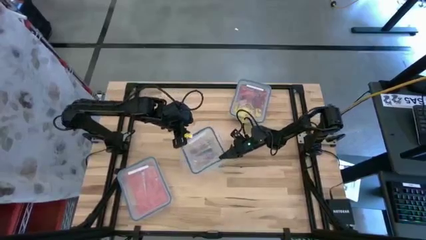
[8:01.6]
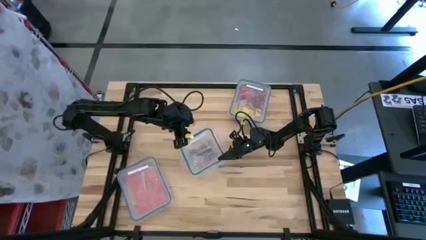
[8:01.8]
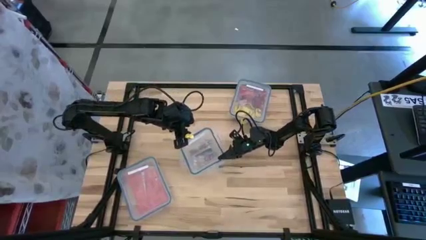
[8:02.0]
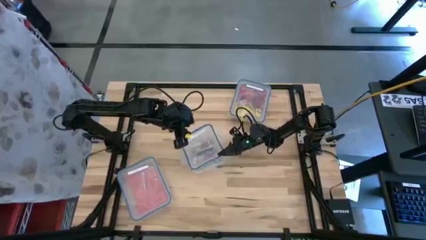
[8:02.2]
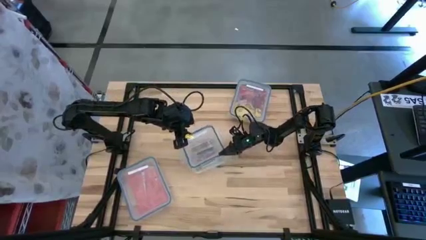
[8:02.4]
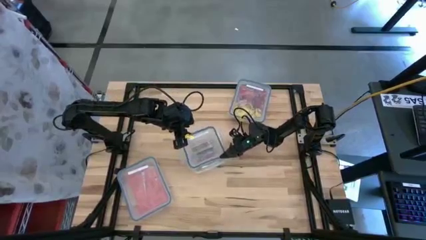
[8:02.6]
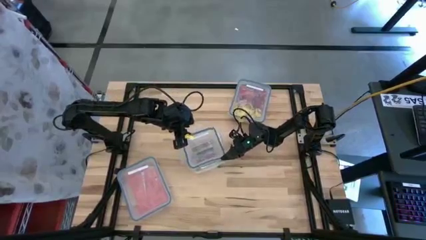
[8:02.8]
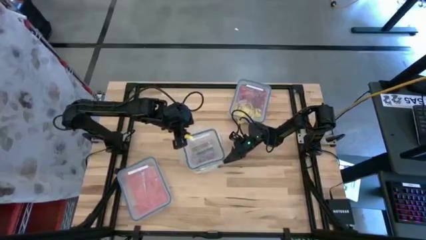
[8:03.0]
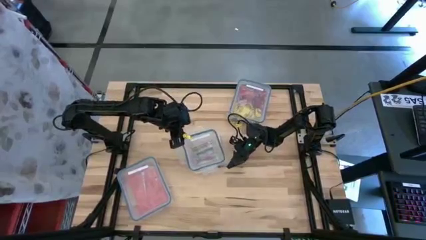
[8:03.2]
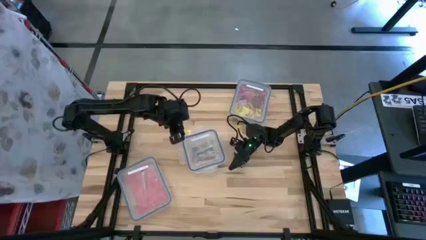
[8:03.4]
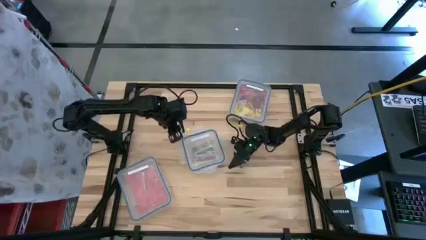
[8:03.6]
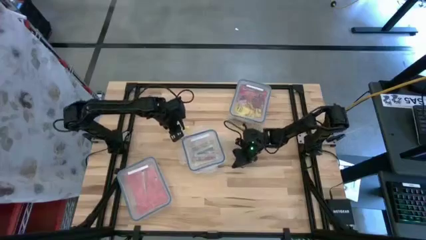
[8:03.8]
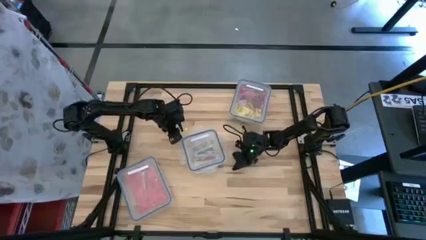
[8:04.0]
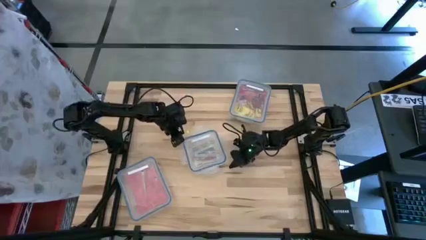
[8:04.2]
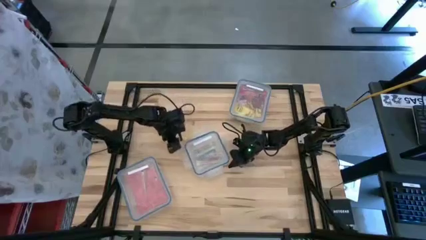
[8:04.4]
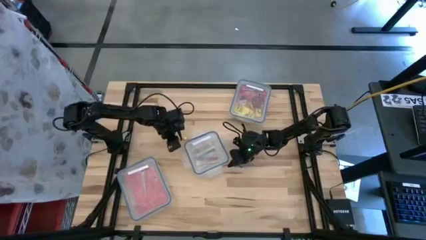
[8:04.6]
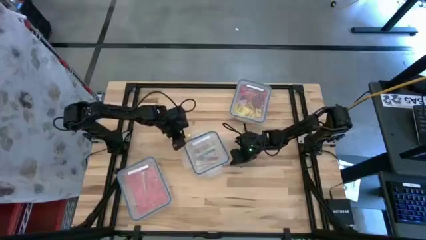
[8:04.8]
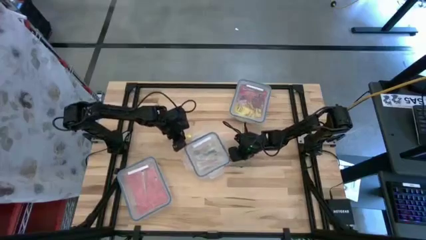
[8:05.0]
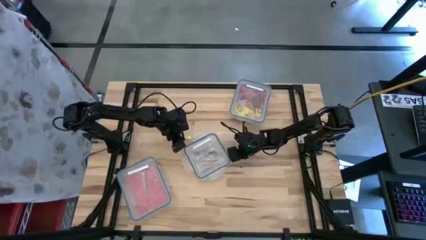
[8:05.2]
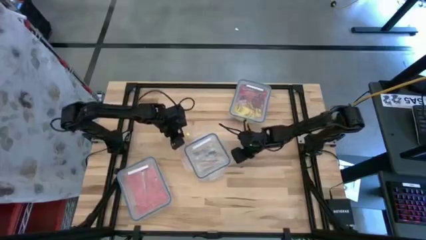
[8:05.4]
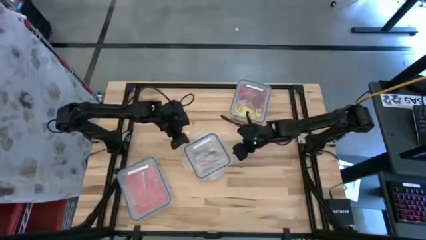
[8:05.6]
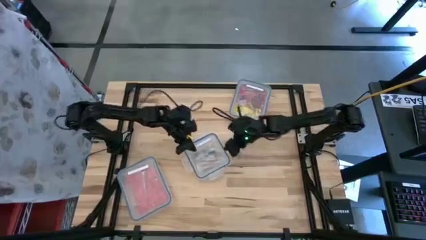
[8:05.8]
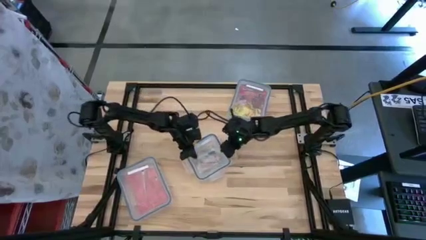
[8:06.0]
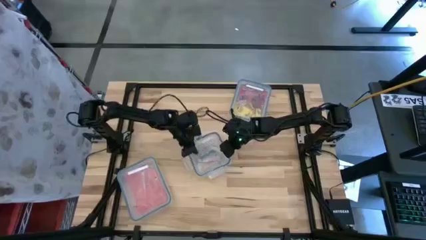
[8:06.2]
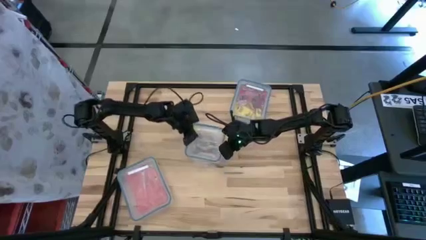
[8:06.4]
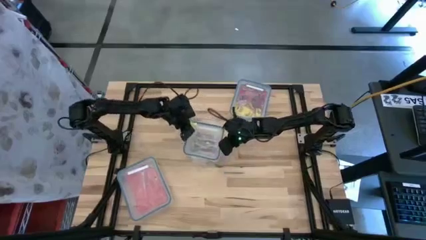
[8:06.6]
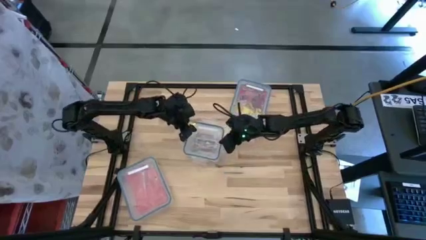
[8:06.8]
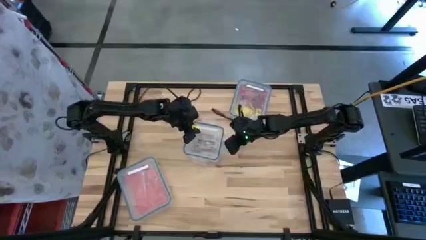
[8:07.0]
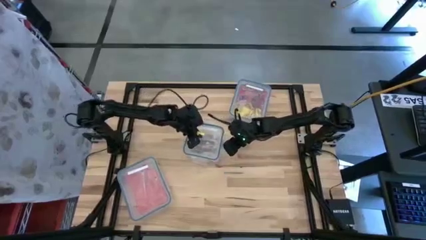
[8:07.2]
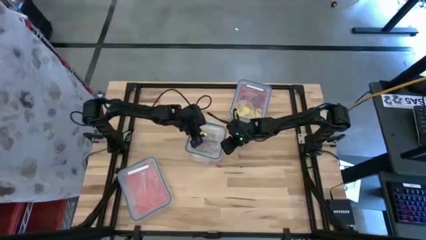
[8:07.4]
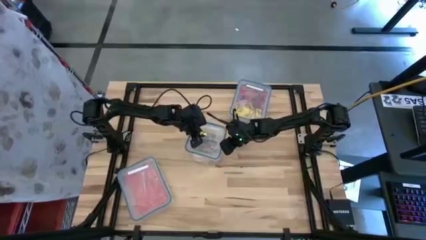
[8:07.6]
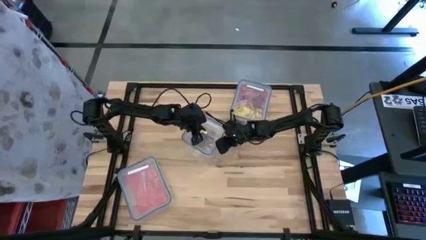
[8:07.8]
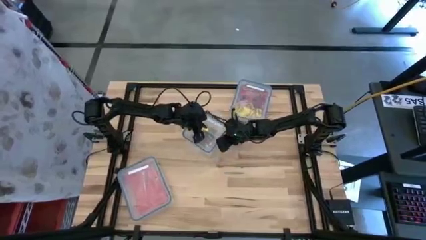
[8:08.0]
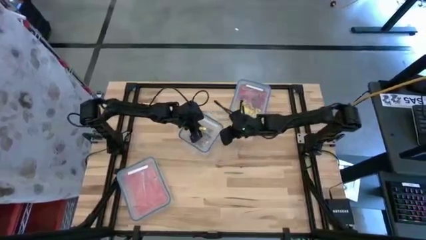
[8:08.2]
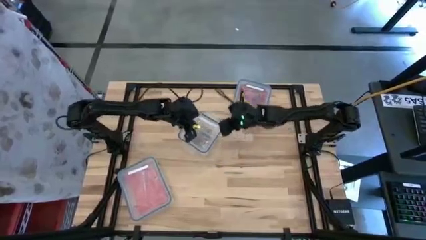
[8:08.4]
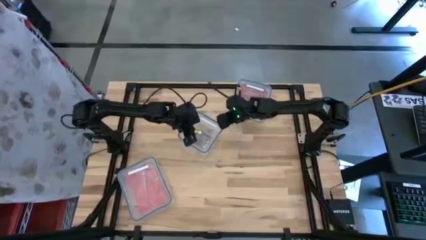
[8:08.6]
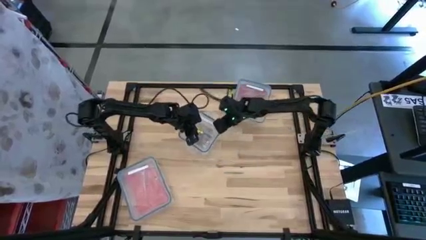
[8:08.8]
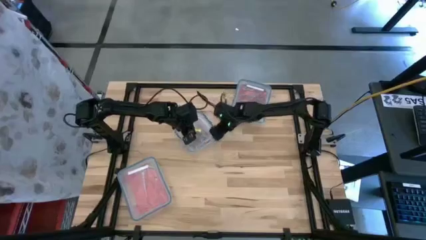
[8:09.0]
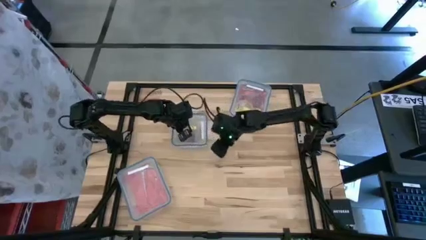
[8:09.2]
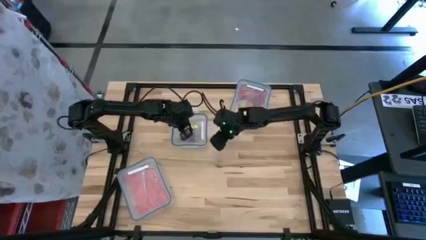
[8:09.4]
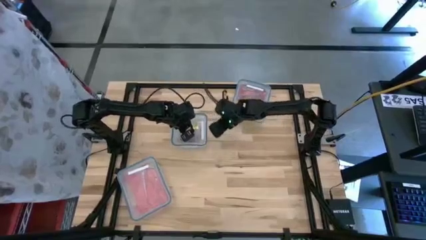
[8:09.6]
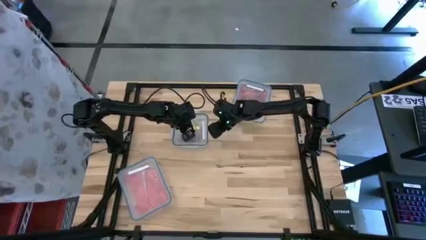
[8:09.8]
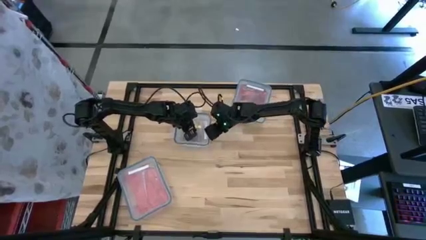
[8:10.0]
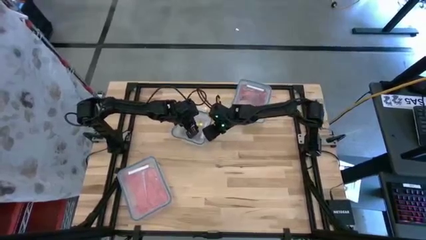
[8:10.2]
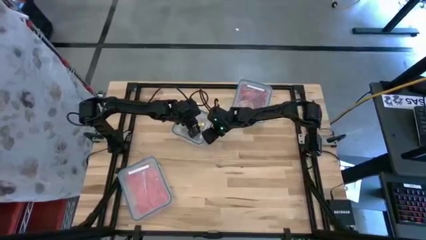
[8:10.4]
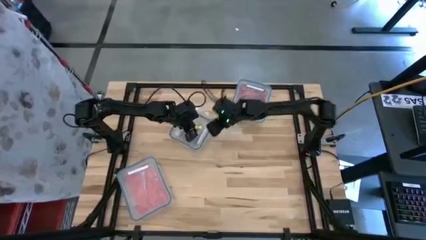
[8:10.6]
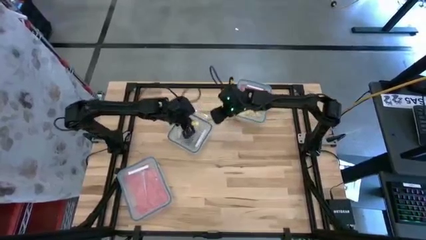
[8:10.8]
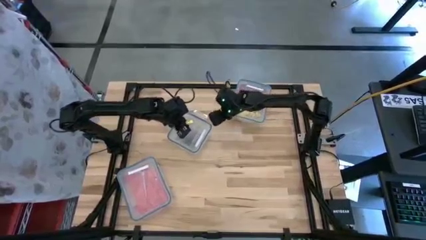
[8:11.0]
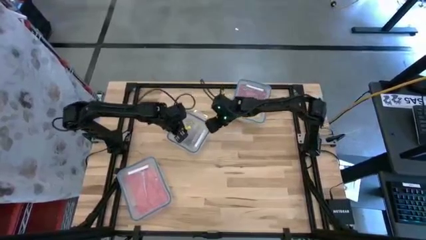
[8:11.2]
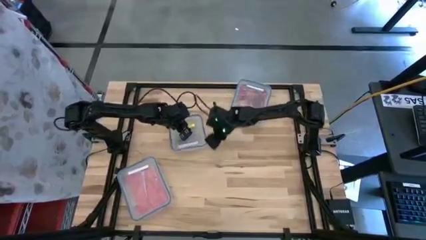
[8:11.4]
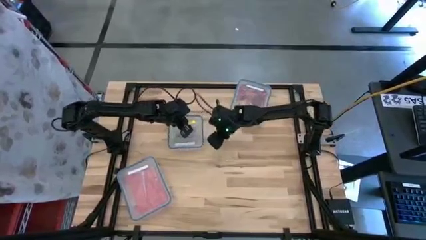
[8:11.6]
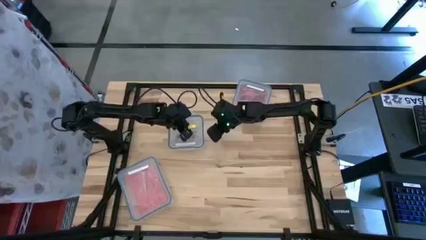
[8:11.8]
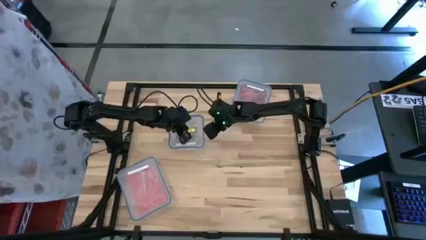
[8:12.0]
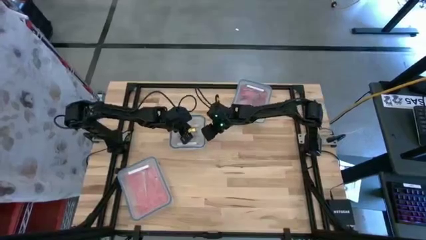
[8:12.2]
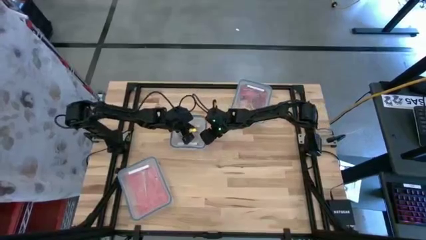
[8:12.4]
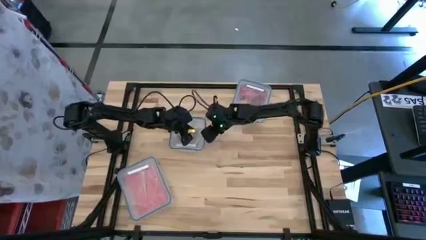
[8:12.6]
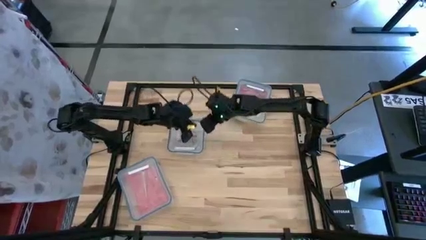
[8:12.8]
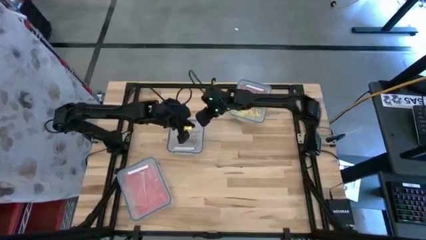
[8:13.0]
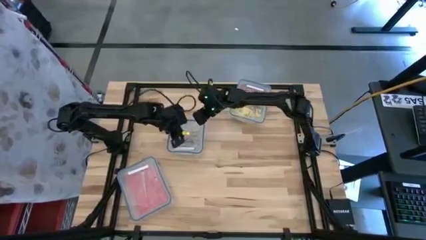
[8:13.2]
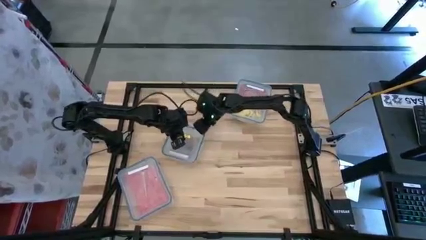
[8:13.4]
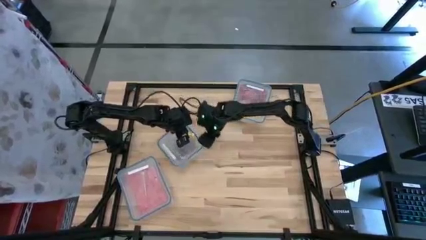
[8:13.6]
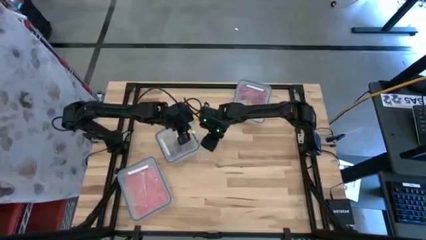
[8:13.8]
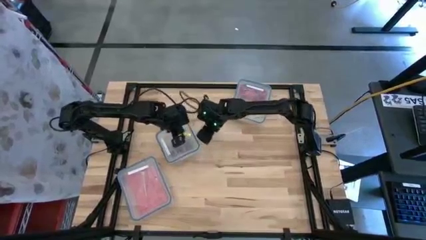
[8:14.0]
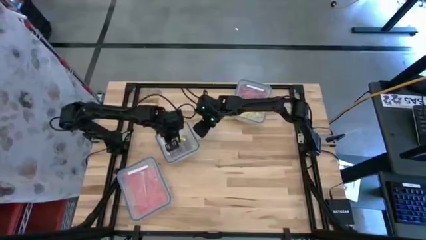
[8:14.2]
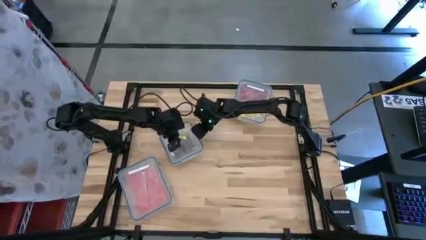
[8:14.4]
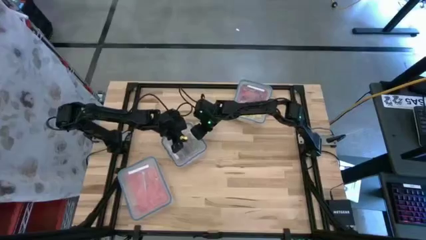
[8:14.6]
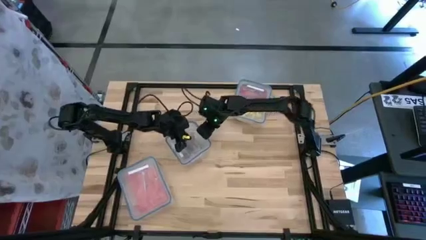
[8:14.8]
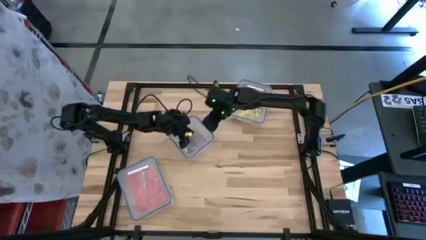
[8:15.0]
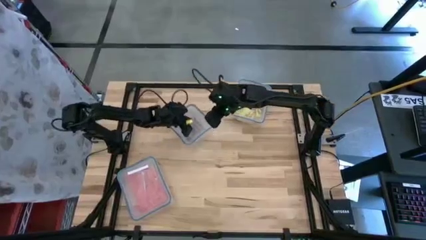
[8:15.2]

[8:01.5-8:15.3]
Task: Sort candy
Close the square transparent bin
